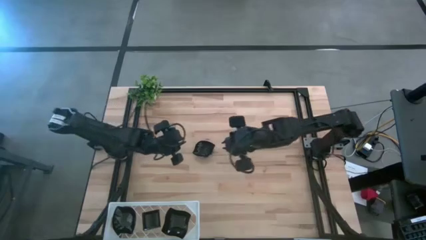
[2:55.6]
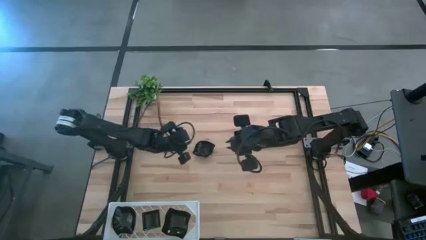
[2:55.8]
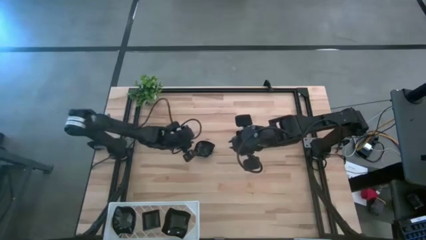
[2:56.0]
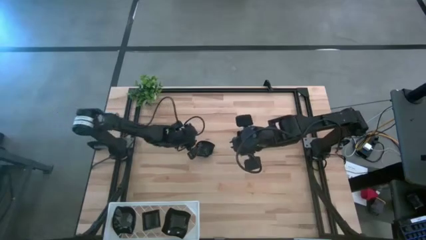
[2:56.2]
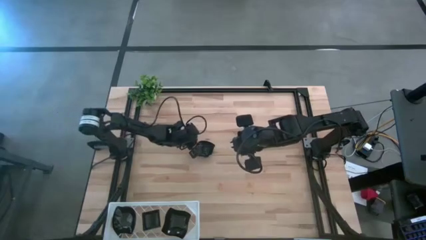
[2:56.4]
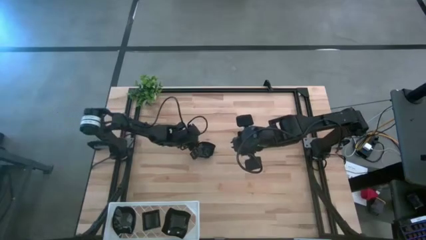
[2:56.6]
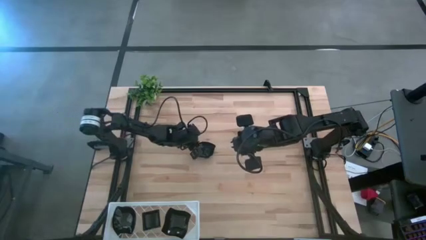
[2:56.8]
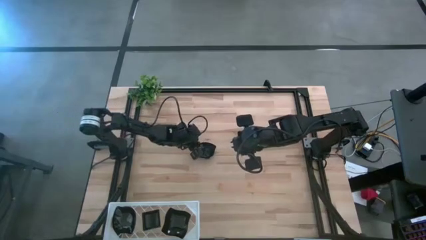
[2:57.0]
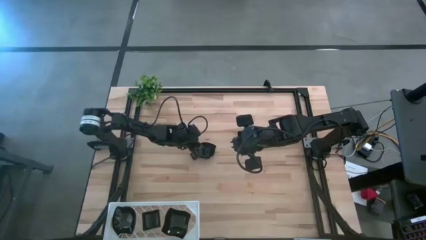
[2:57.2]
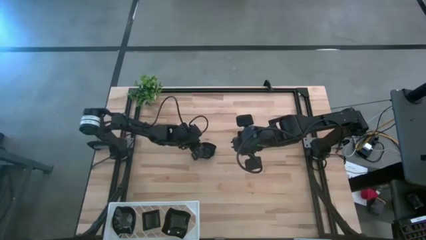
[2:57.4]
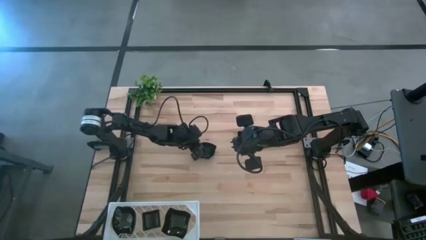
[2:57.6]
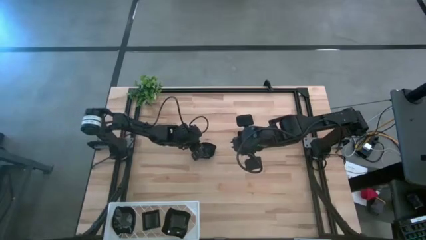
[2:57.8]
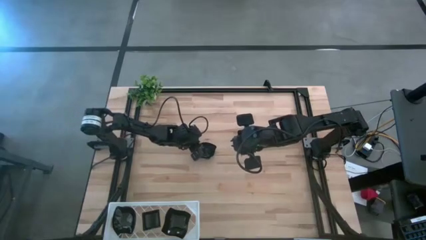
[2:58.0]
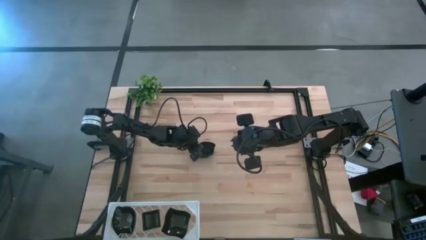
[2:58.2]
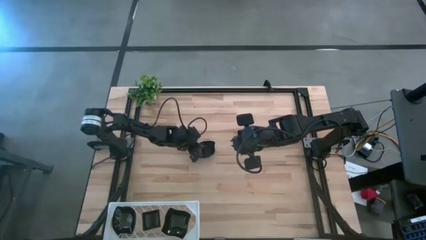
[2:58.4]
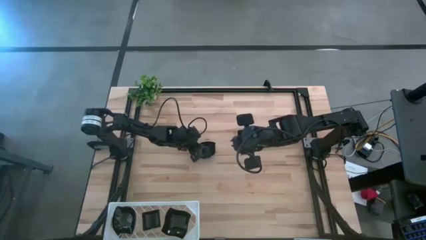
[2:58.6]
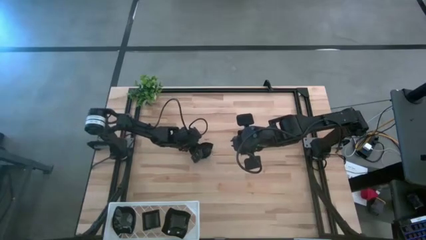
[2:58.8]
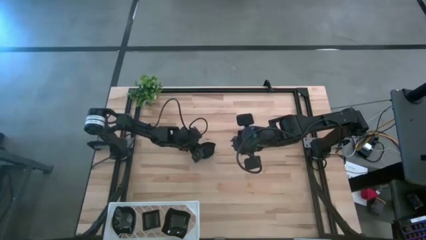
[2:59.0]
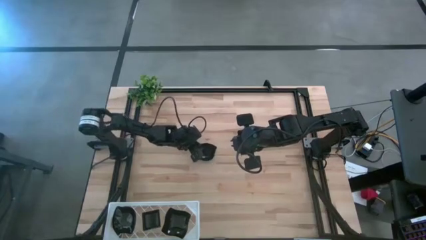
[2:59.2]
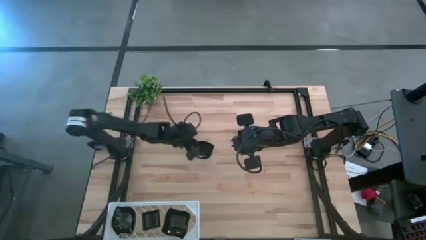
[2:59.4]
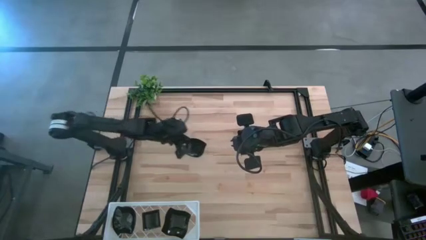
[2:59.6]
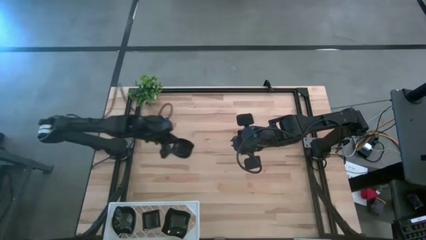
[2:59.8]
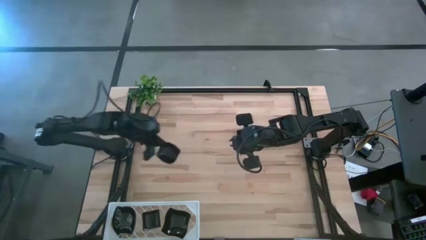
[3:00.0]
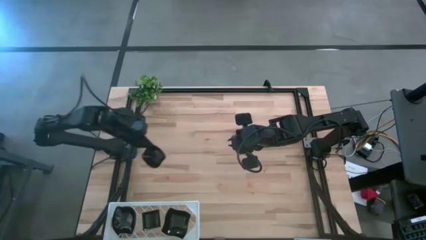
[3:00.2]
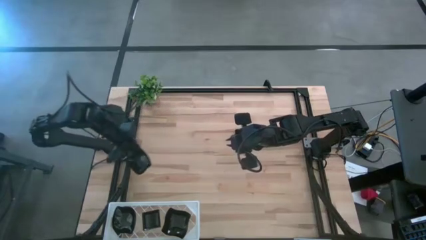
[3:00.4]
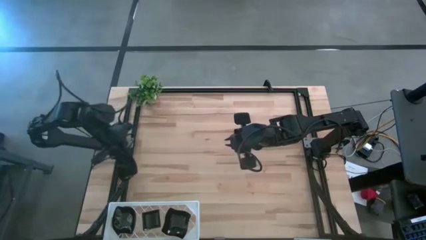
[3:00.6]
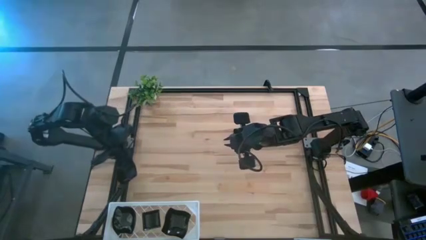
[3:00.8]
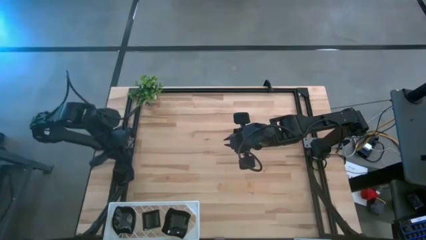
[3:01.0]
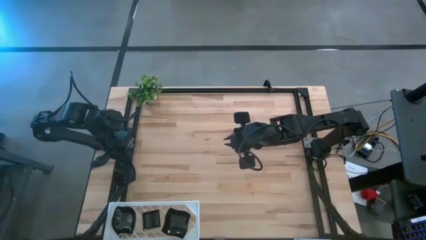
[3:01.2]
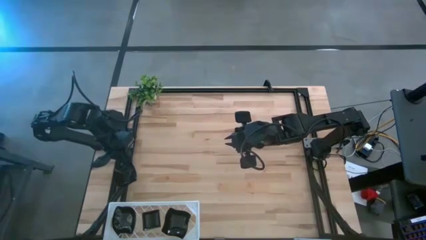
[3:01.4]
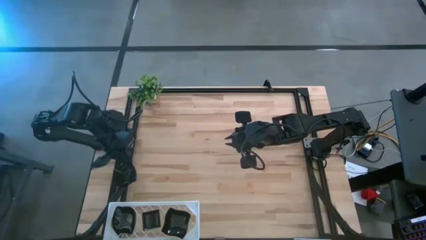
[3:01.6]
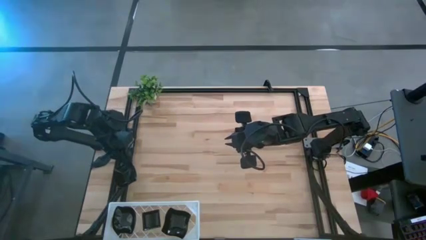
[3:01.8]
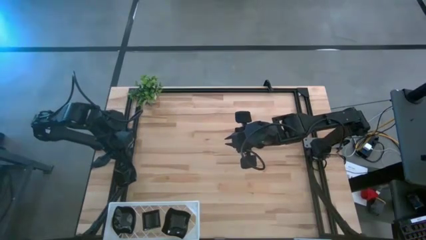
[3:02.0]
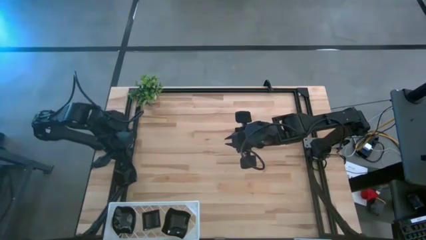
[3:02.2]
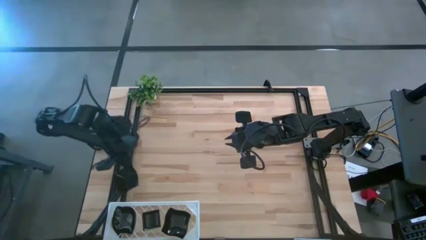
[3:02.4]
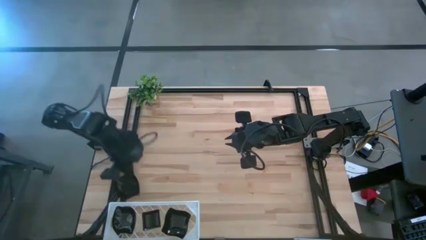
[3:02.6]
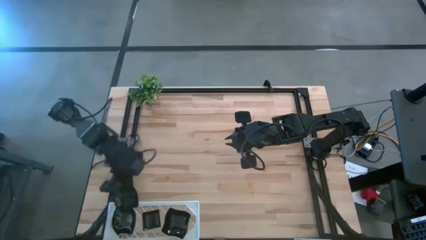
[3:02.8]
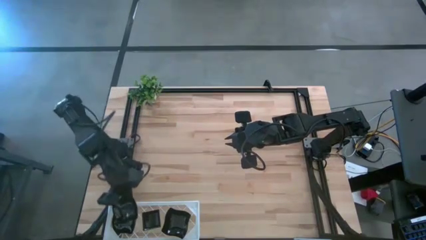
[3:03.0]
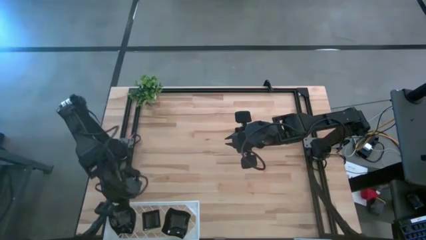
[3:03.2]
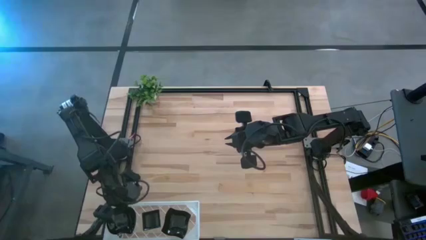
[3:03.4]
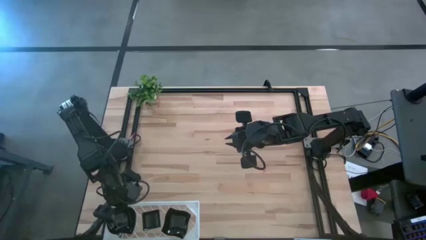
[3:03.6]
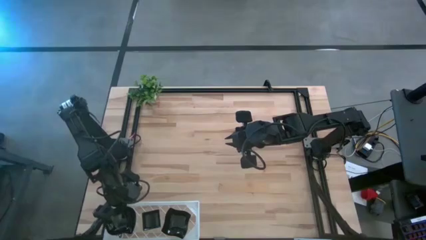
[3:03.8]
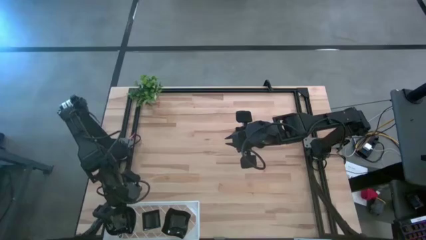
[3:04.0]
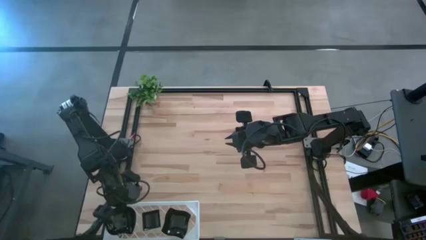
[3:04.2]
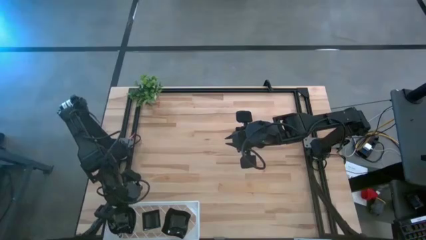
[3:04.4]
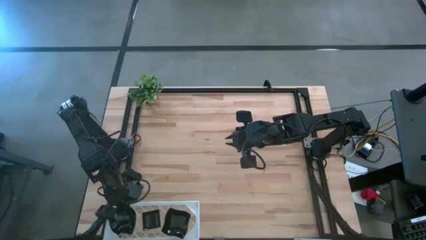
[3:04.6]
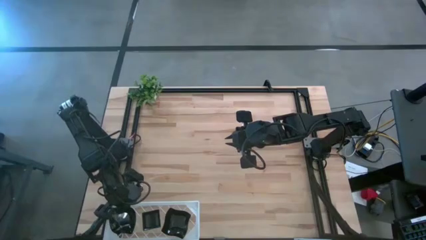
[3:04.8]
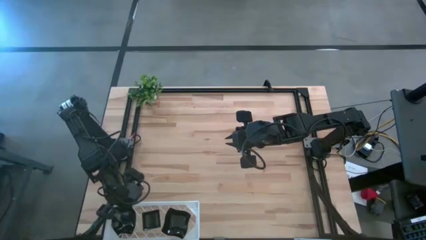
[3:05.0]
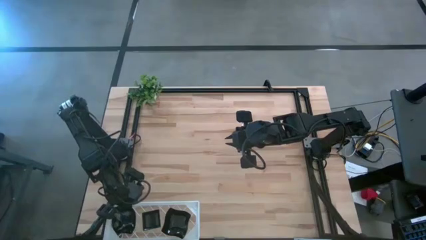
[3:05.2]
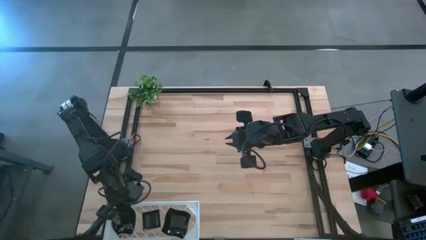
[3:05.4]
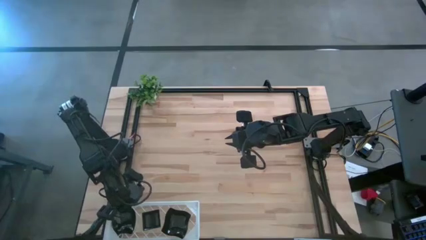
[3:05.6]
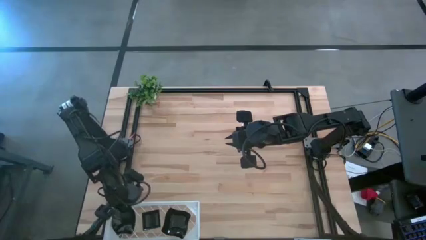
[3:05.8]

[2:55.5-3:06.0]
Task: Pick & Place Mini shaped plates
Stack the black leaf shaped plate on top of the other black leaf shaped plates on the shelf

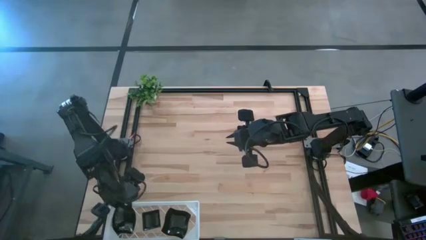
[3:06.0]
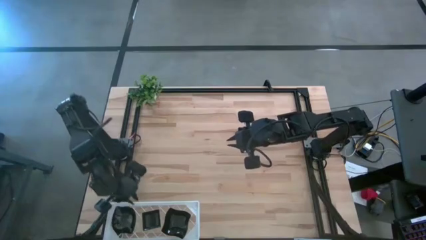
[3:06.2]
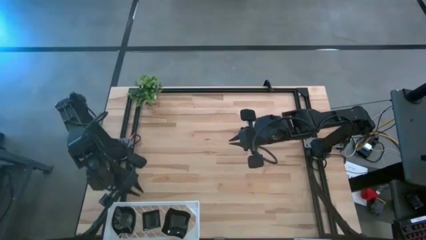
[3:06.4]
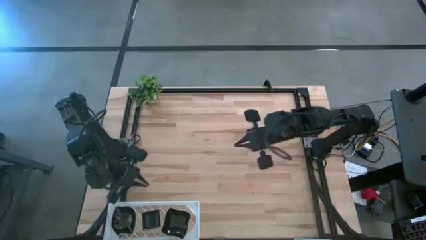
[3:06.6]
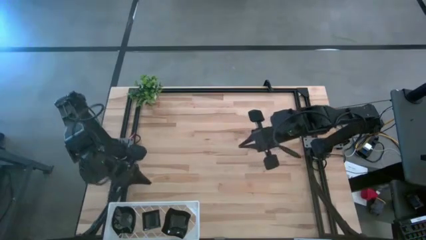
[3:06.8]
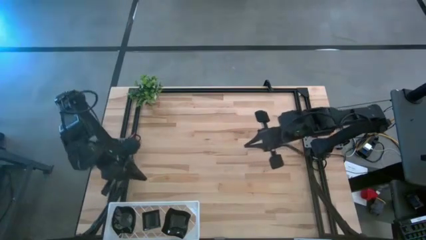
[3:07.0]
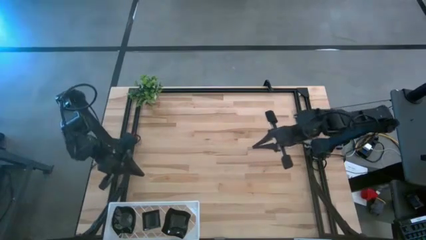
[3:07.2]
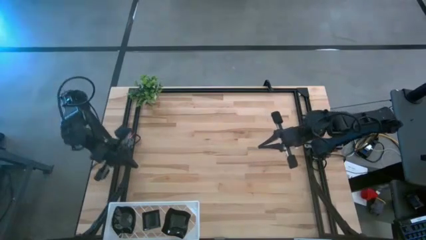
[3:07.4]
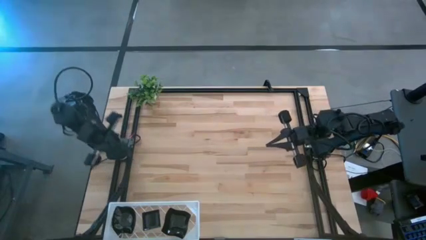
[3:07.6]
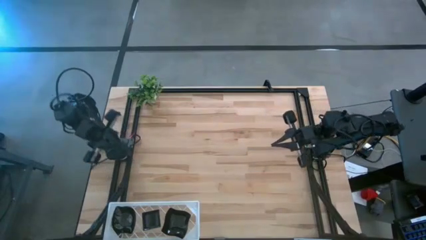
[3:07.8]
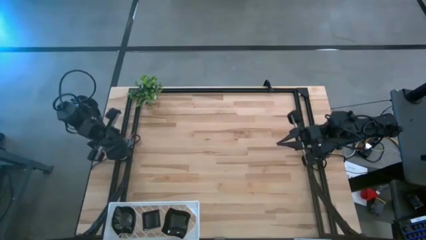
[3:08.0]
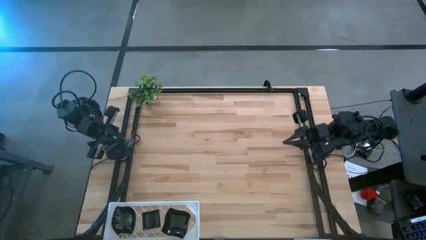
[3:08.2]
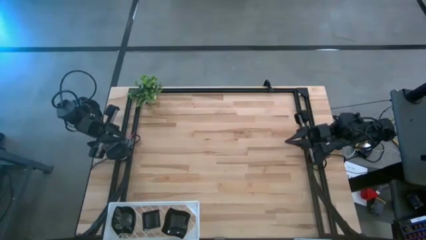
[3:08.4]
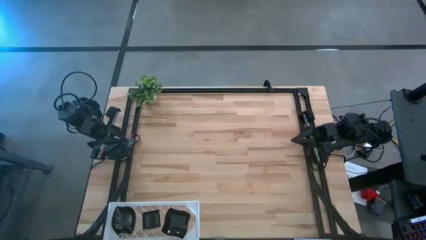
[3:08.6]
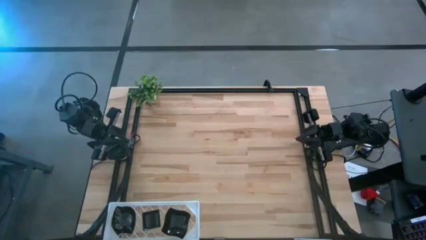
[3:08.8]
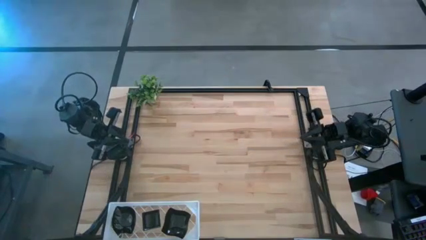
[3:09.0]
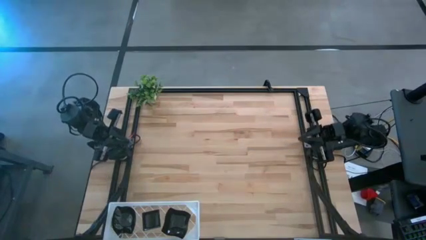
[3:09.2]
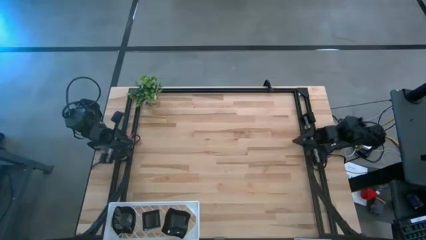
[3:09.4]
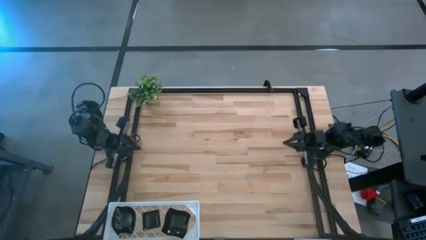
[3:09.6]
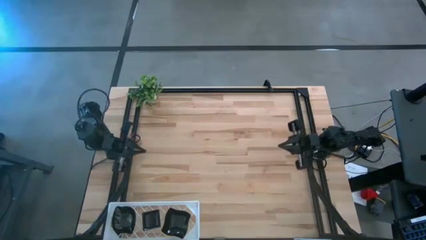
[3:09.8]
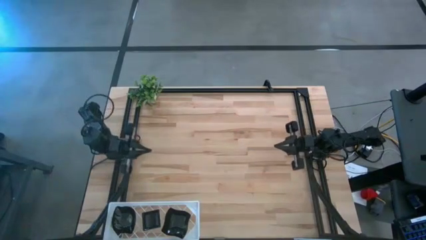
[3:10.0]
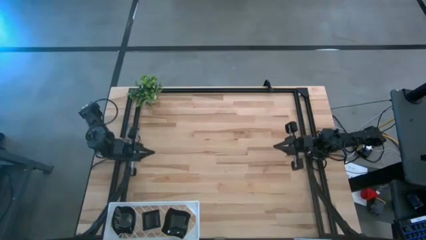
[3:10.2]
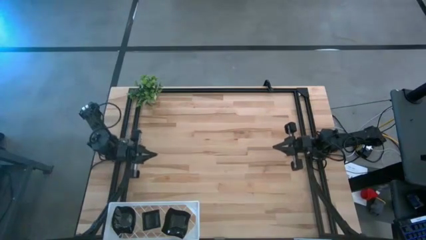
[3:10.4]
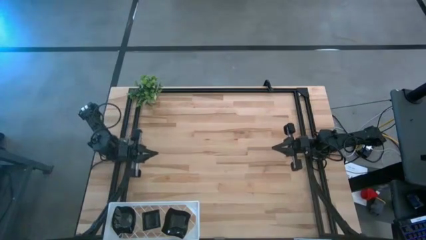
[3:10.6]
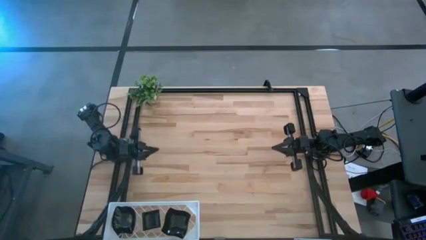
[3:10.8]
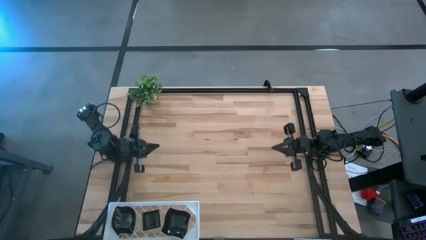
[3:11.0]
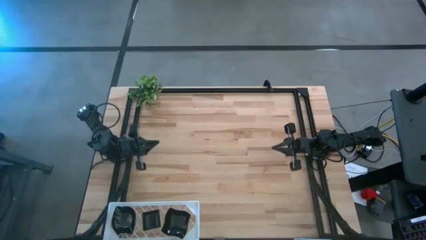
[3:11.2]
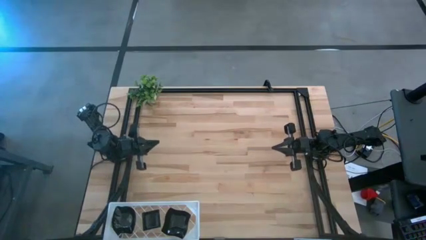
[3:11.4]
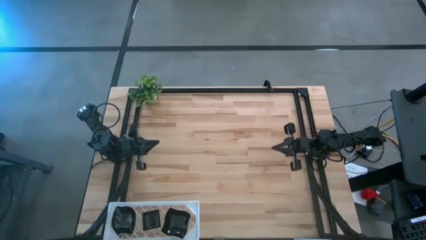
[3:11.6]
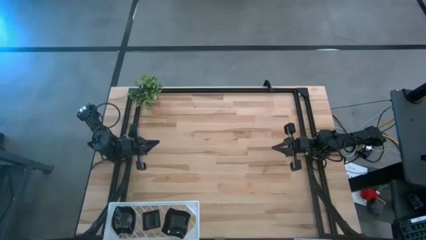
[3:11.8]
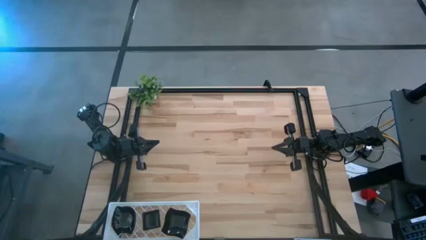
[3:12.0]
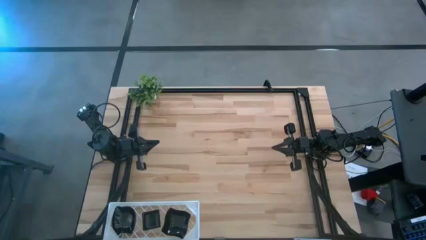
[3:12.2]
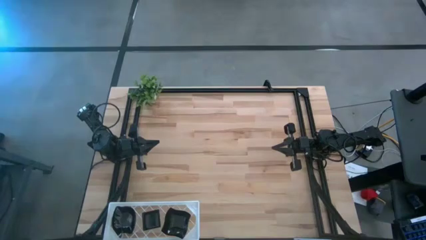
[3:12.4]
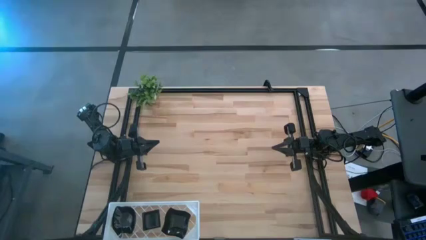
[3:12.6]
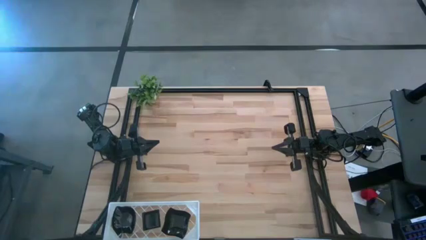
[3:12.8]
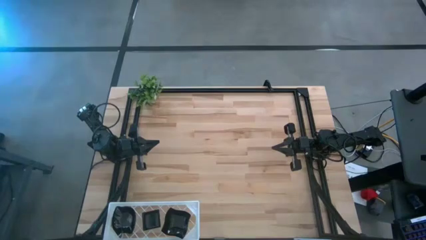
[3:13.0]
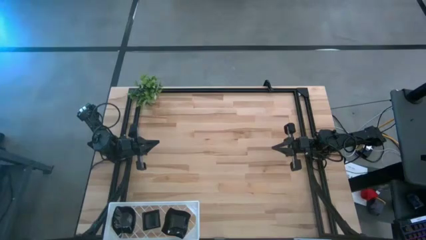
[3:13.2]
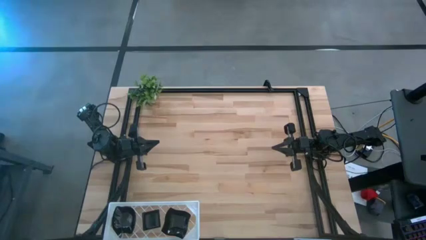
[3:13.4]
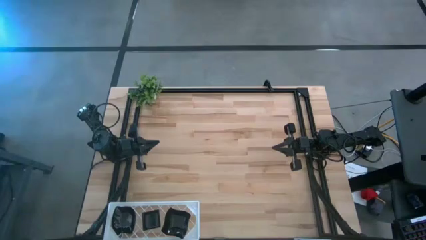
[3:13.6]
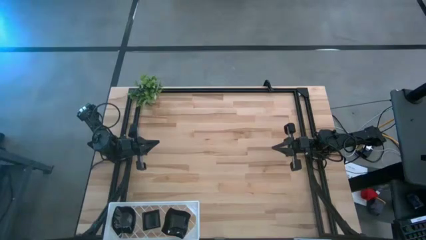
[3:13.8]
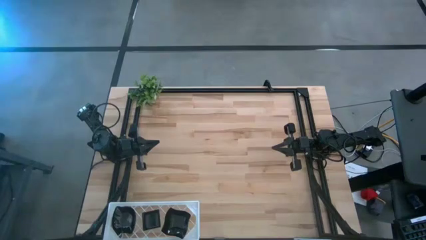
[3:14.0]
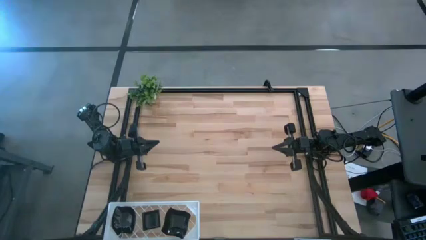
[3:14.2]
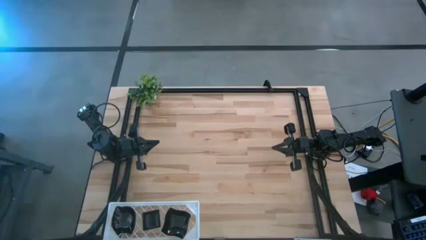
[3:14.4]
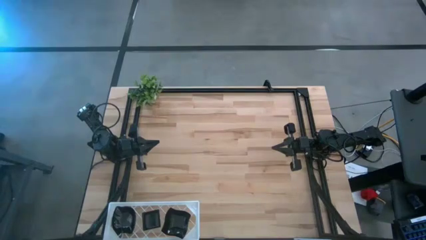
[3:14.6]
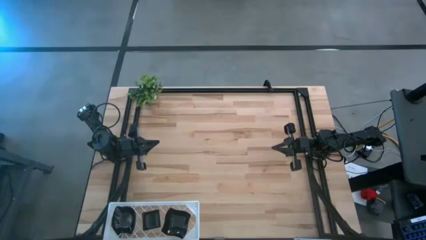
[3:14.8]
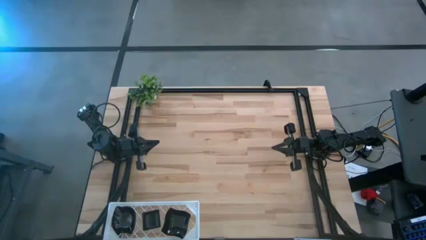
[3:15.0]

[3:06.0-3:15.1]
Return to Home Position
